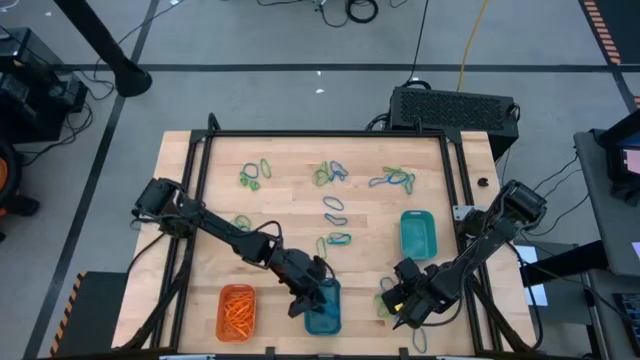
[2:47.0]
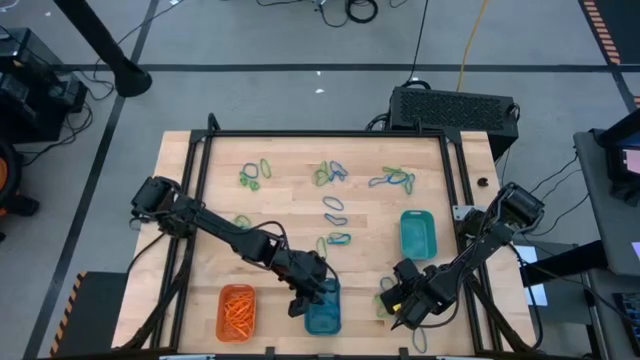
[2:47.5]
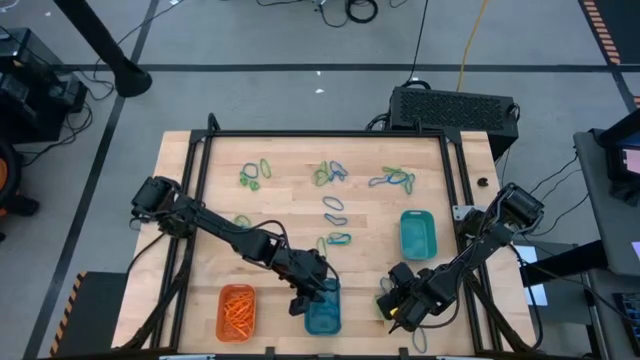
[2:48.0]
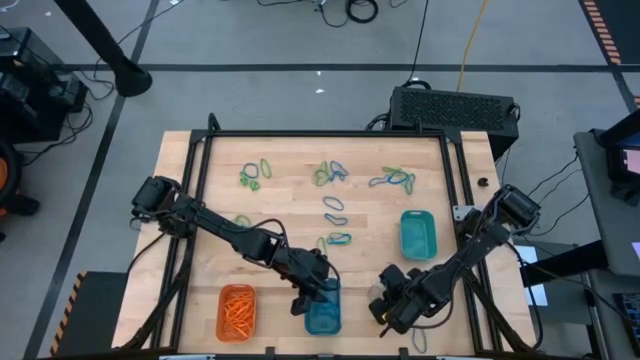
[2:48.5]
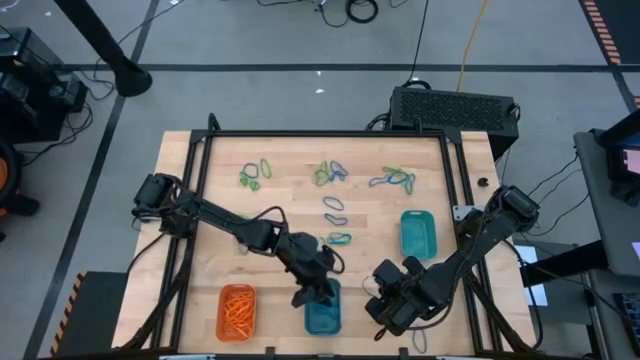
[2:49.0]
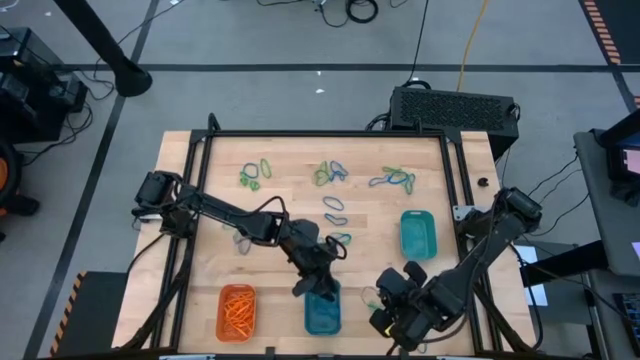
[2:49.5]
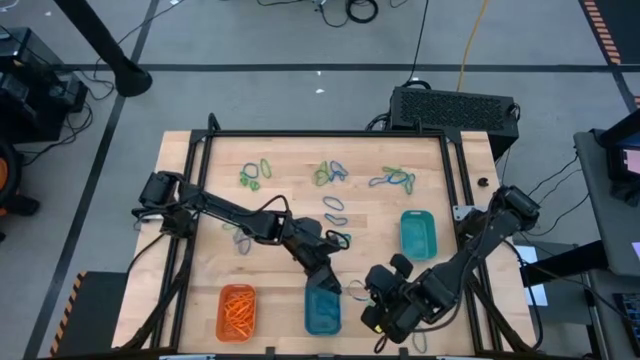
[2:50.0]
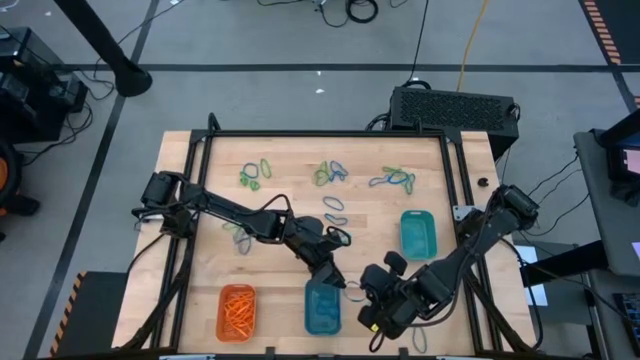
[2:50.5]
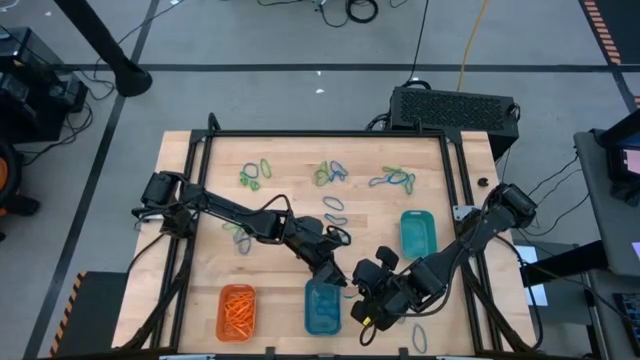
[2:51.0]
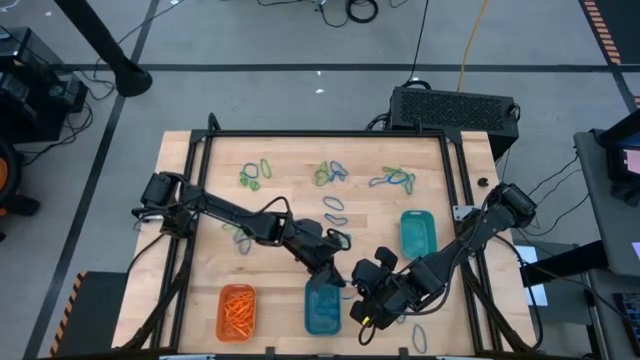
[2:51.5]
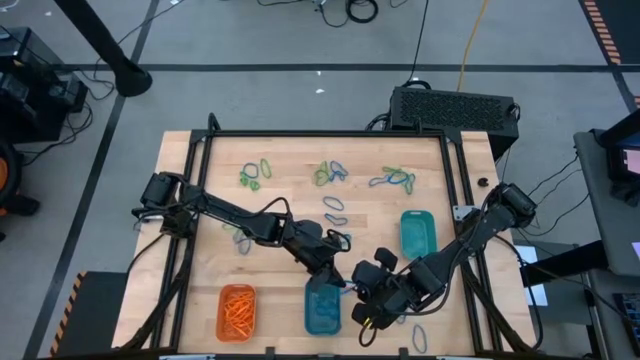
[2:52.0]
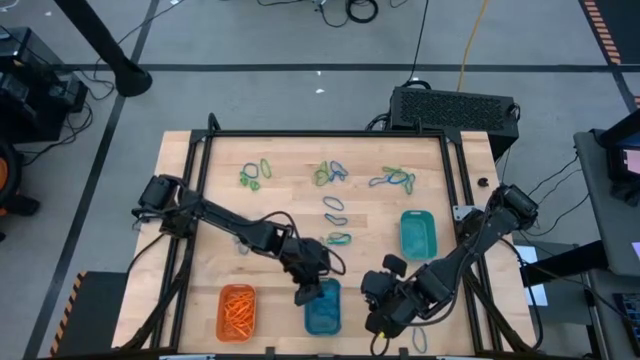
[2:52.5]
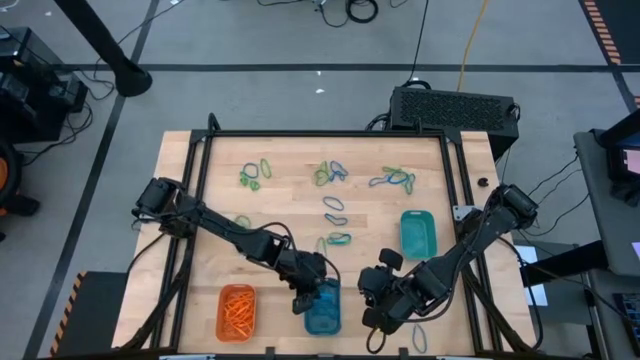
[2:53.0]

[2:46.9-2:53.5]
Task: Sort rubber bands into baskets
Put the blue rubber band into the blue bin

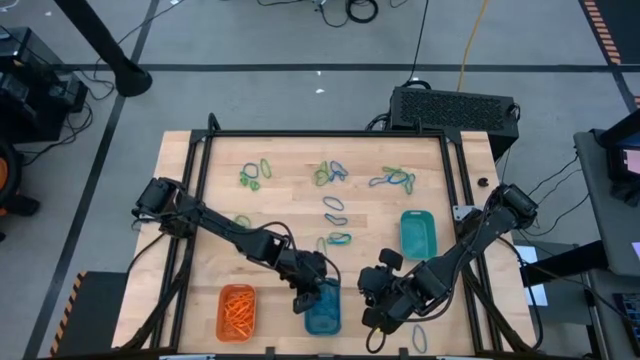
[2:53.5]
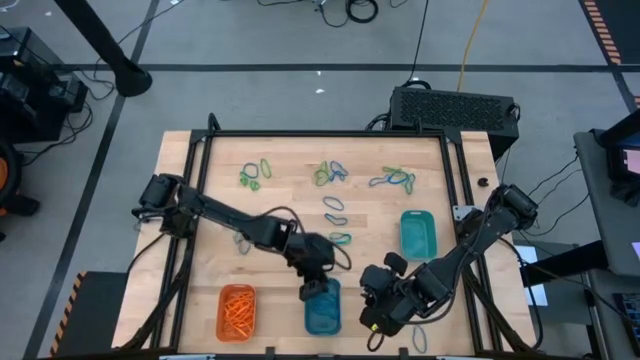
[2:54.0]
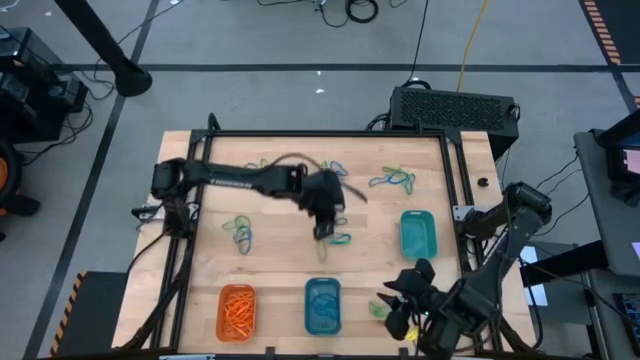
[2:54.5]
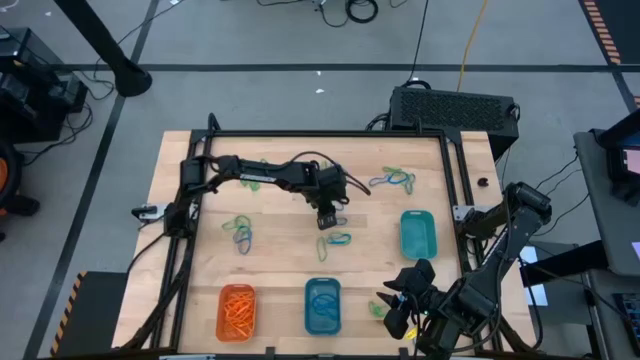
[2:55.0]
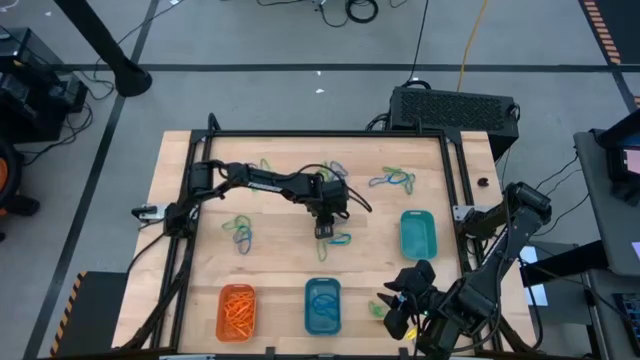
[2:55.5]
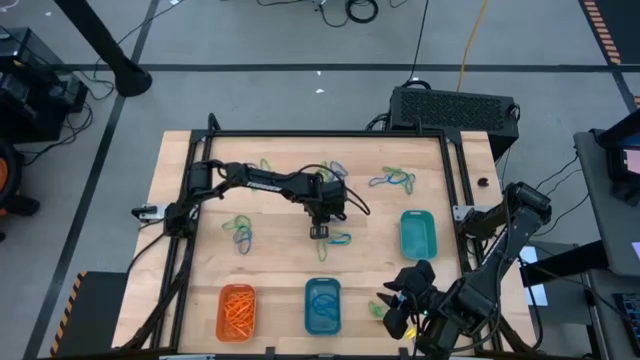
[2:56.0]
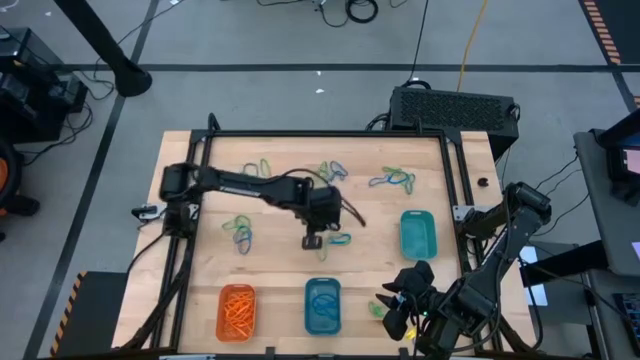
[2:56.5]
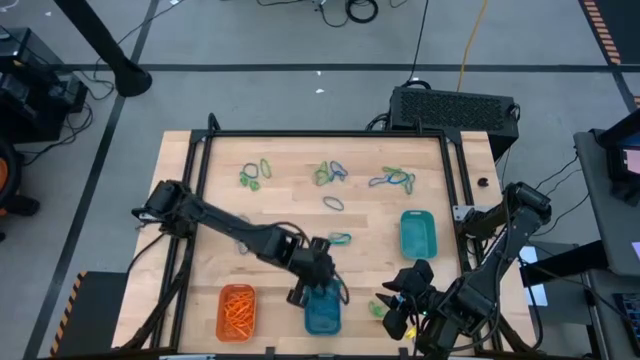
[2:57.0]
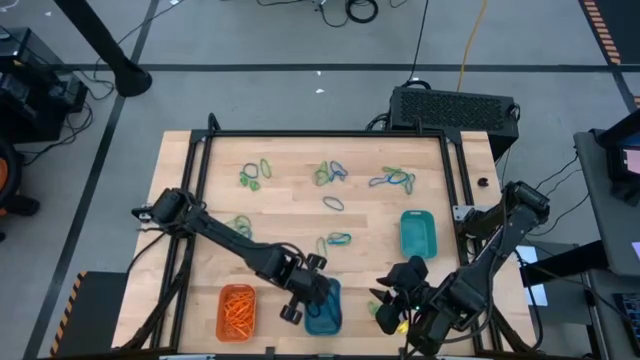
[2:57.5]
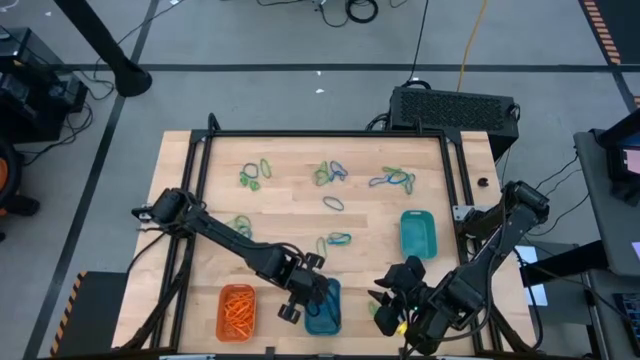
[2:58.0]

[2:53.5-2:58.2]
Put the blue rubber band into the blue bin

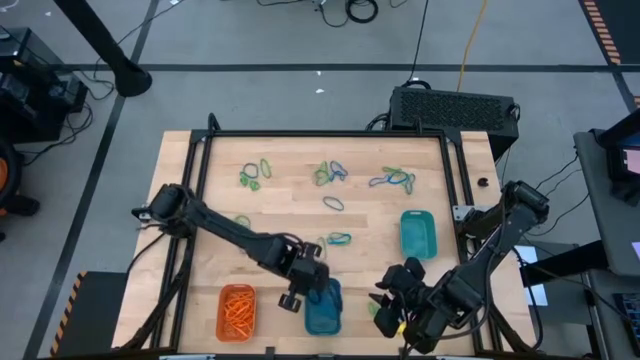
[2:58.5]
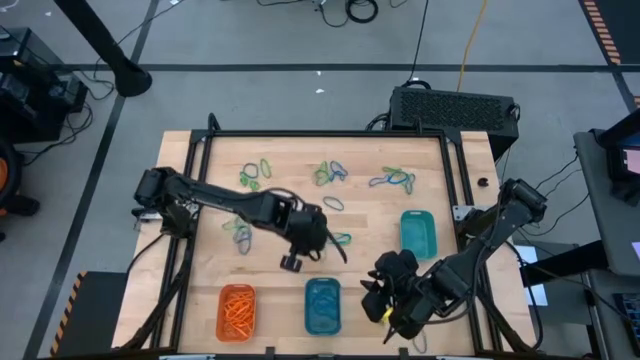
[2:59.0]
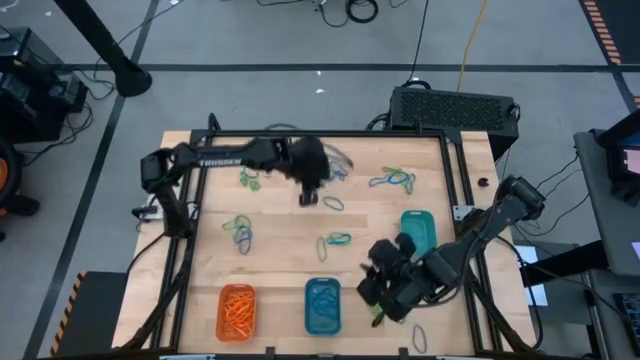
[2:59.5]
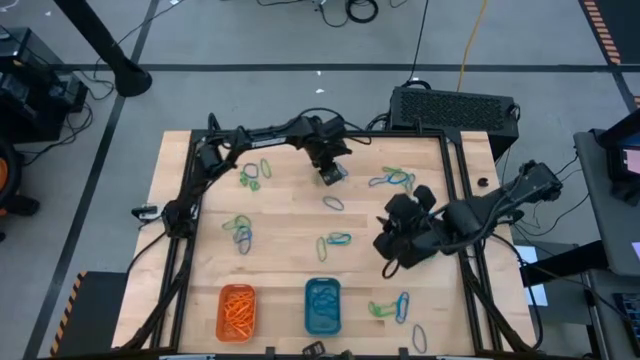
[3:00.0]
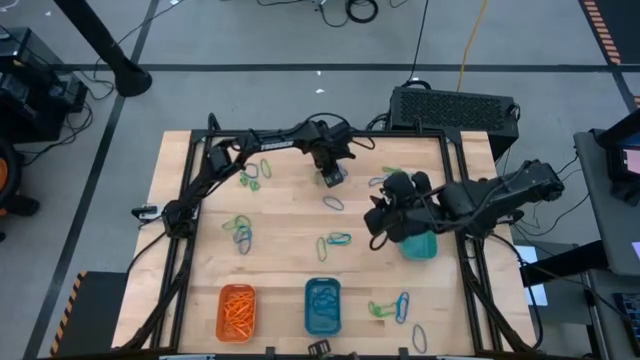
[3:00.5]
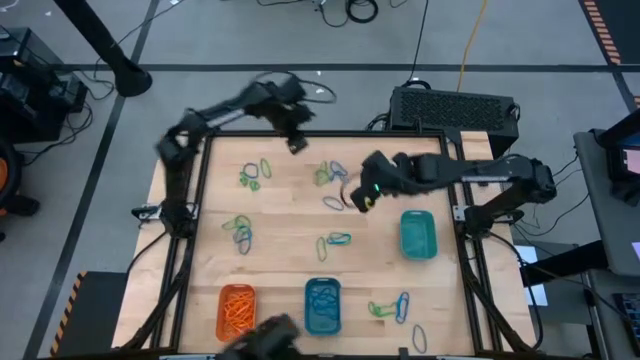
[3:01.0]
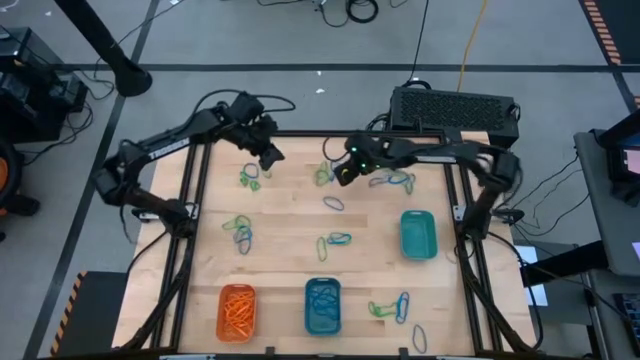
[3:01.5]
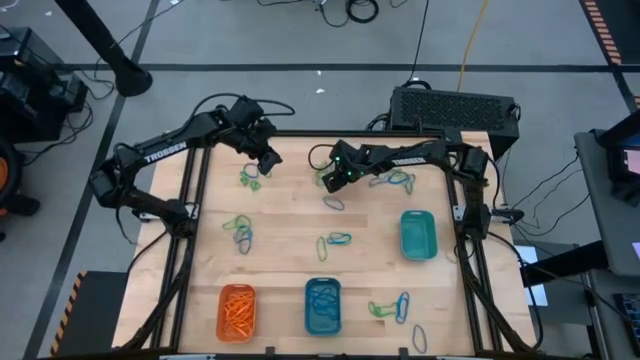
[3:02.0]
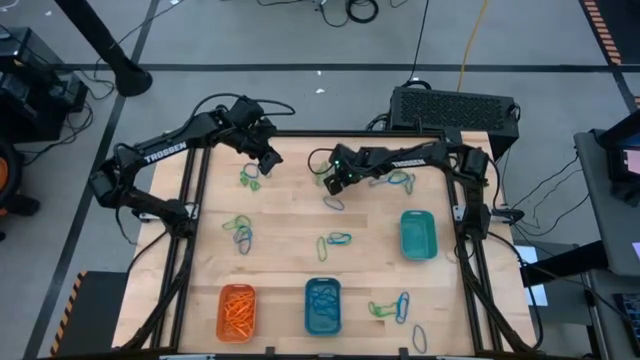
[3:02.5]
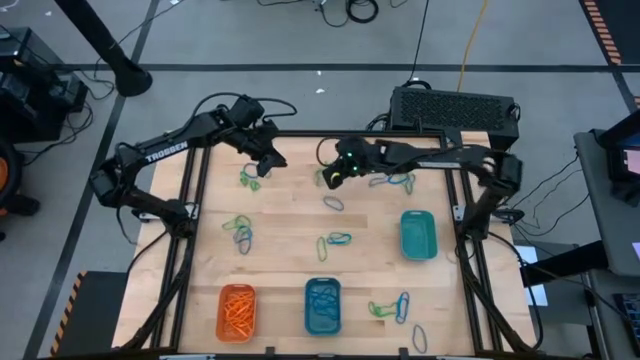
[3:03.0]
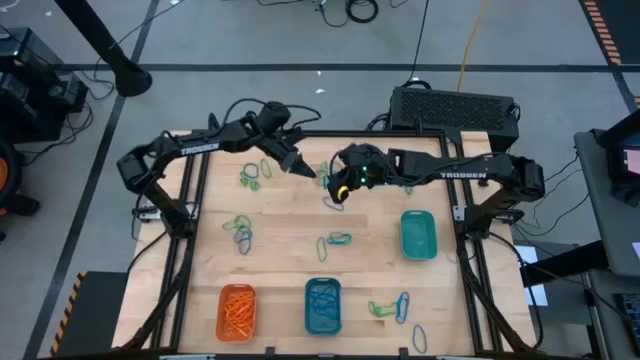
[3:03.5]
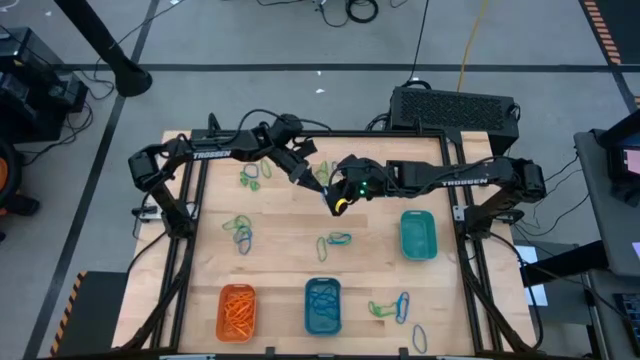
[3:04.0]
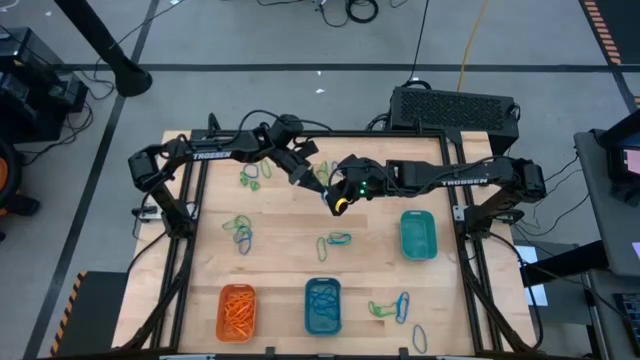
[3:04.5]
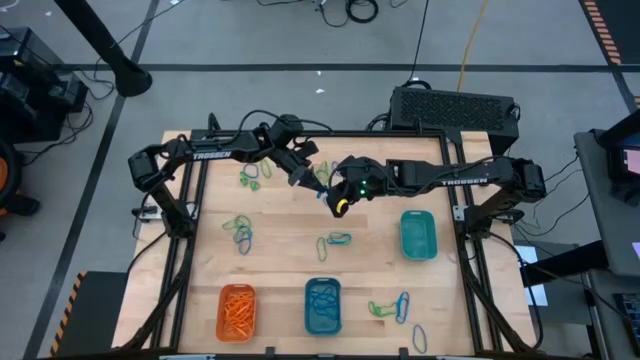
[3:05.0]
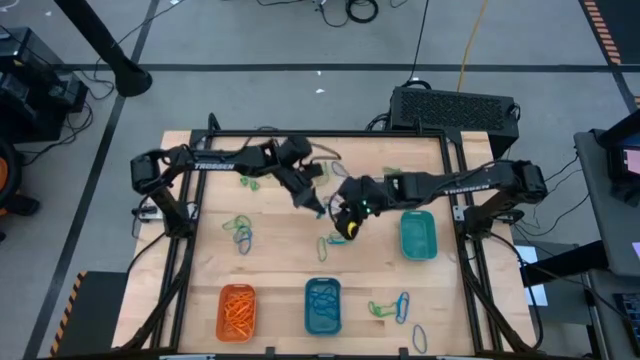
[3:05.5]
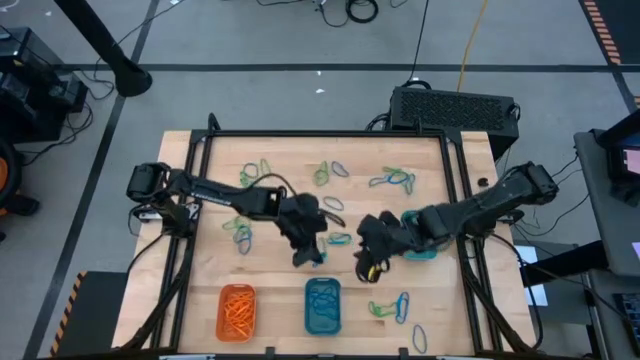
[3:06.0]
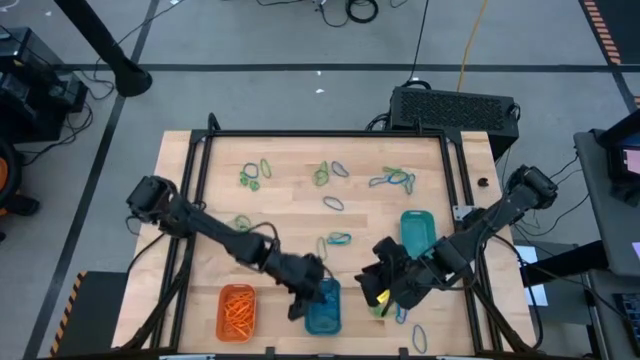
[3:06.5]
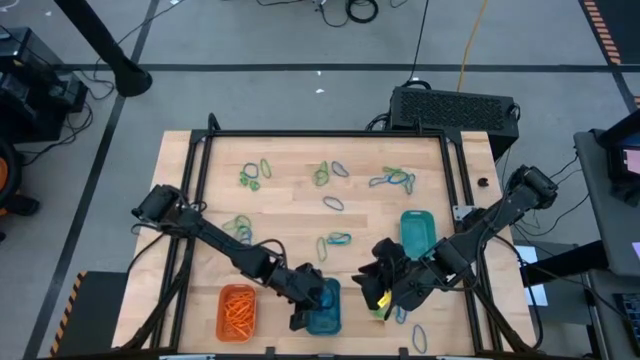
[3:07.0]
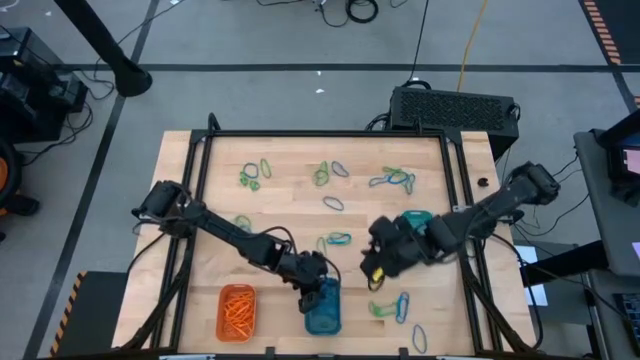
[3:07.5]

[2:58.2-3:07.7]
Put the blue rubber band into the blue bin
